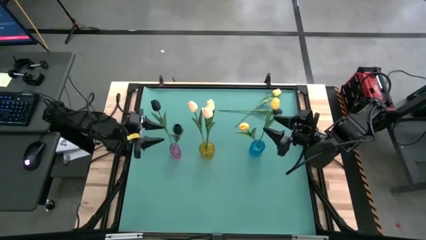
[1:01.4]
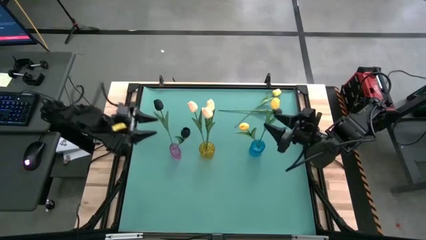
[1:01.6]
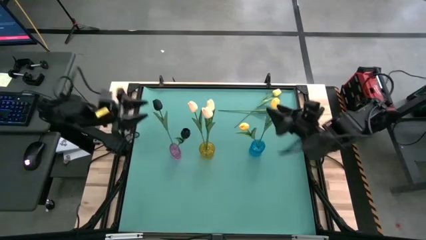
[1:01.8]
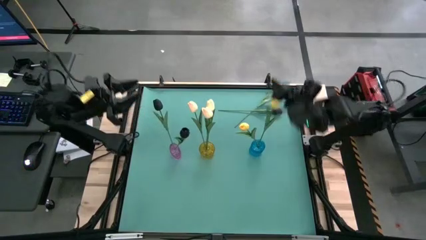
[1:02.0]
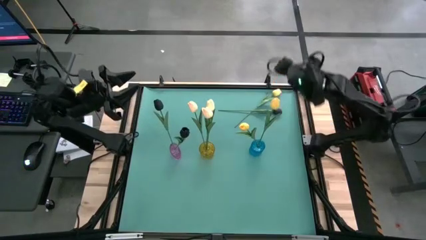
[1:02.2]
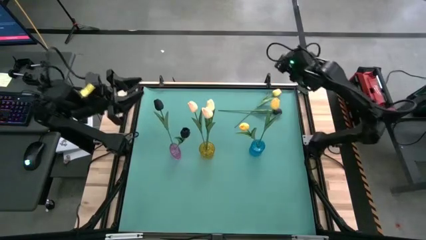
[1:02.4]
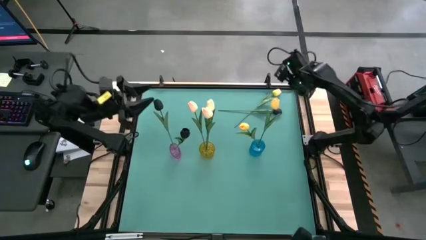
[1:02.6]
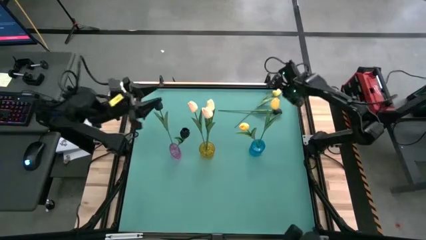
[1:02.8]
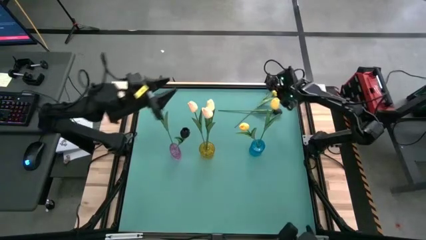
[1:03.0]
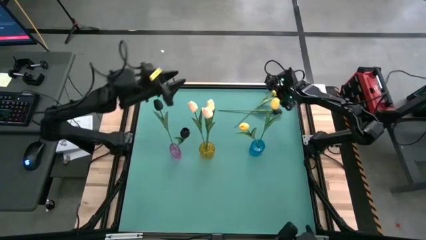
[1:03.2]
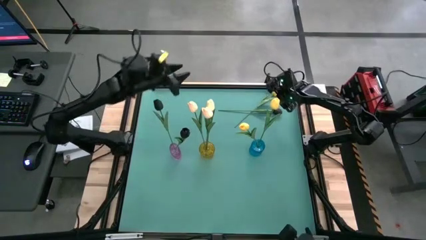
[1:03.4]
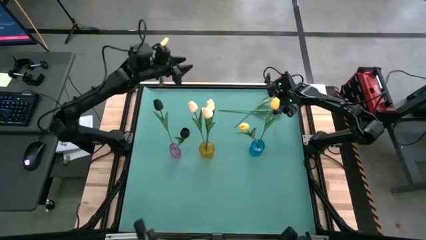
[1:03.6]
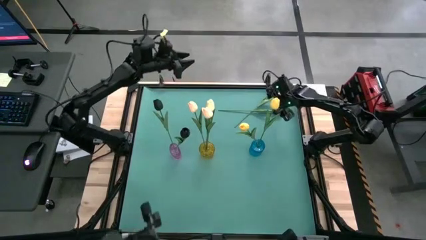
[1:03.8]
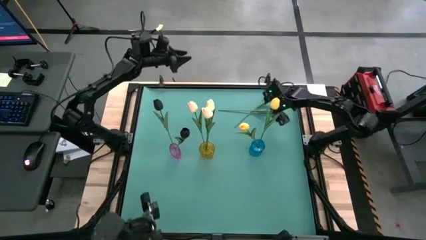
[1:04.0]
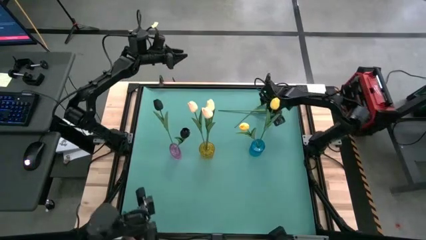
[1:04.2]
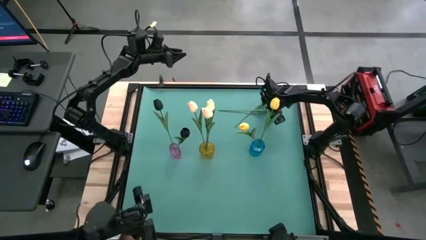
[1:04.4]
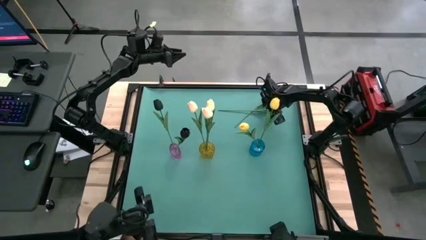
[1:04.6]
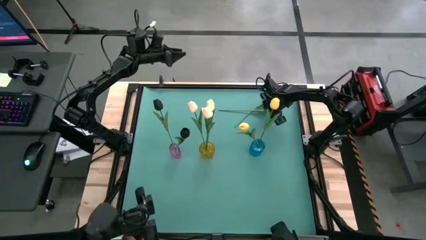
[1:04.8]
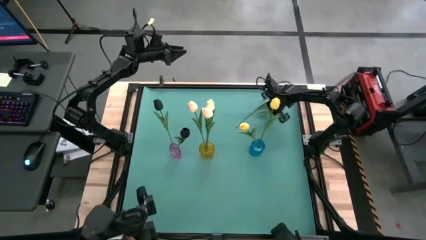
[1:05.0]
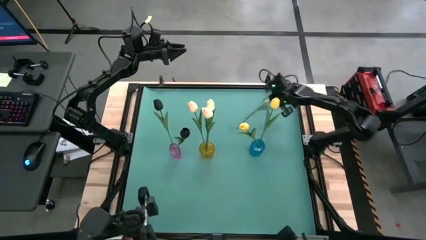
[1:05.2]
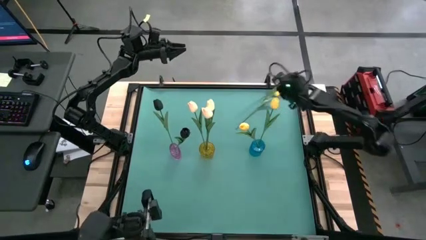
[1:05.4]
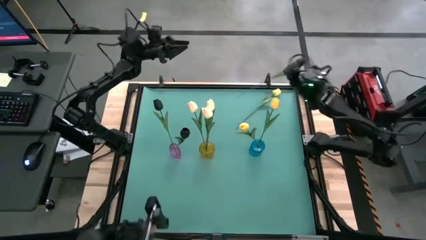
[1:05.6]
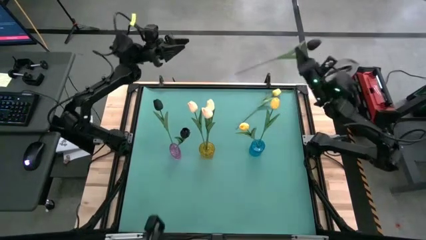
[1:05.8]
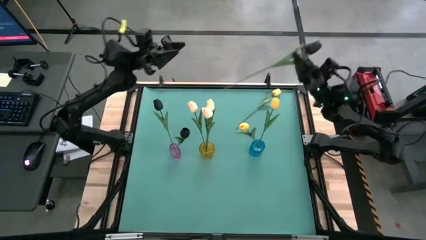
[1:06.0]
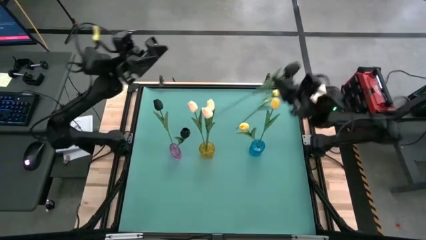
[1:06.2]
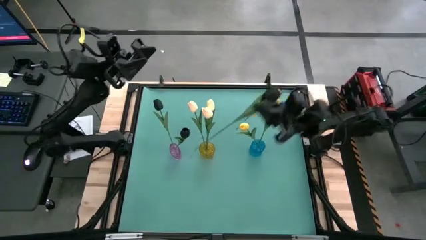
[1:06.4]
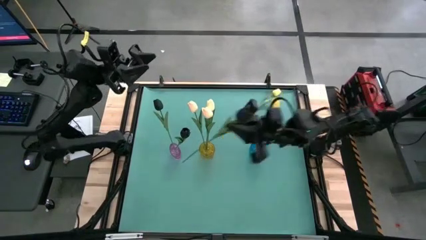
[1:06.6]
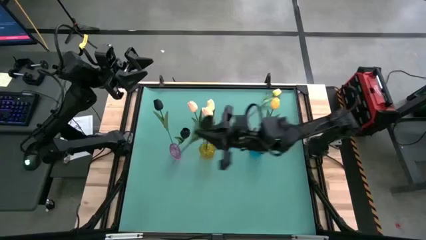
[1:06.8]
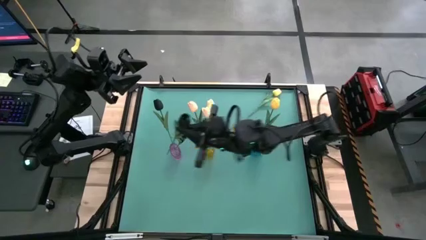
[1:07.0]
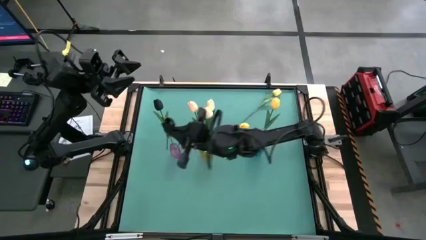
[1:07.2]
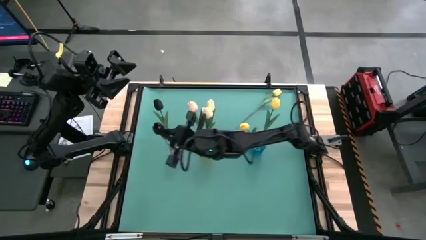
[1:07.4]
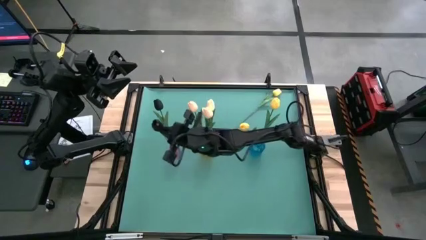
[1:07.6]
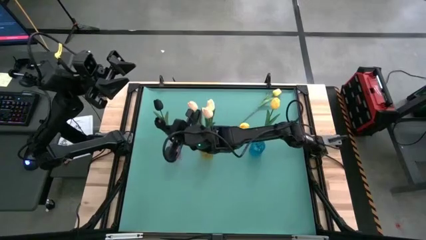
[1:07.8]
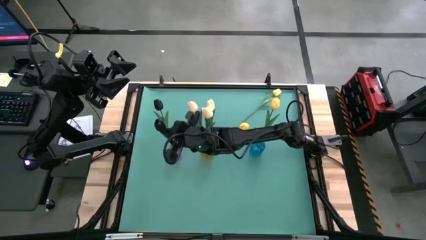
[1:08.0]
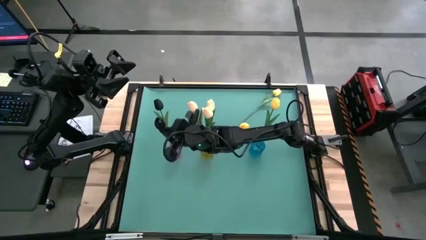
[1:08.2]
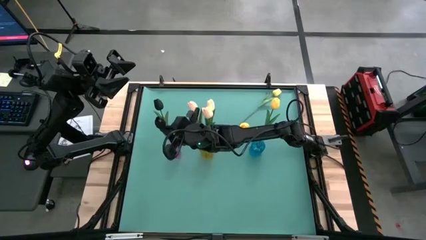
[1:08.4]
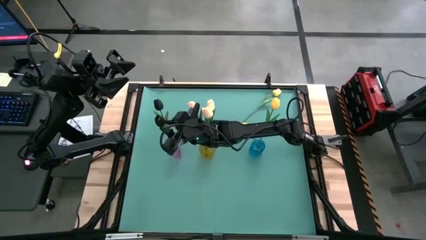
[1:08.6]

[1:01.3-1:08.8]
Task: Sort flowers into vase by color
Put the black flower into the purple vase

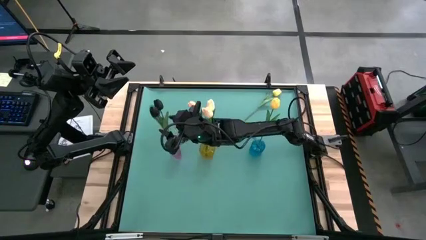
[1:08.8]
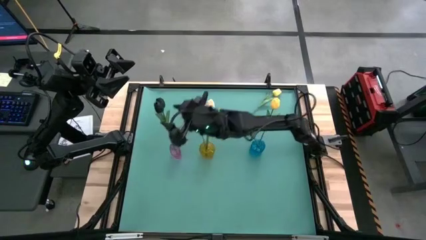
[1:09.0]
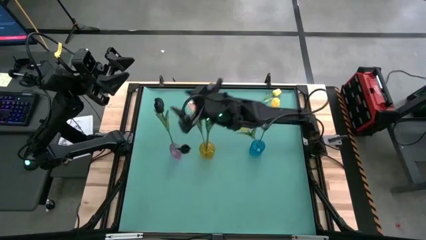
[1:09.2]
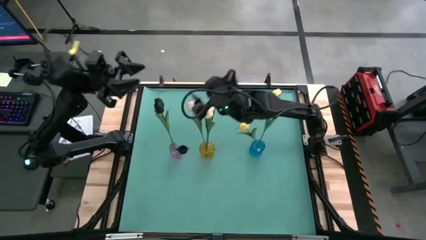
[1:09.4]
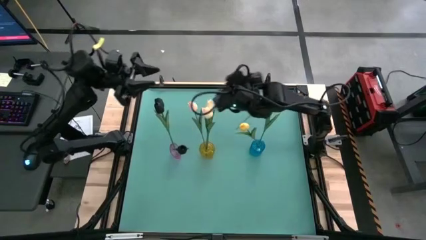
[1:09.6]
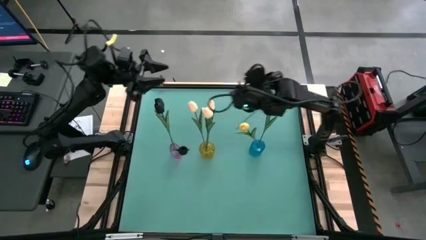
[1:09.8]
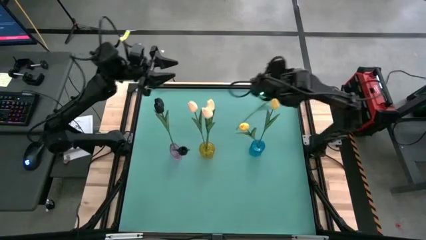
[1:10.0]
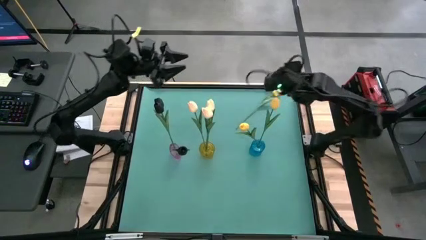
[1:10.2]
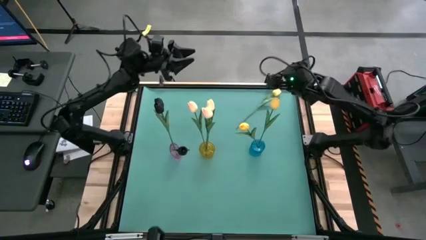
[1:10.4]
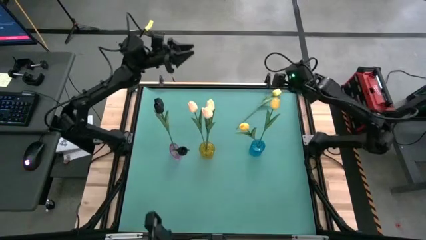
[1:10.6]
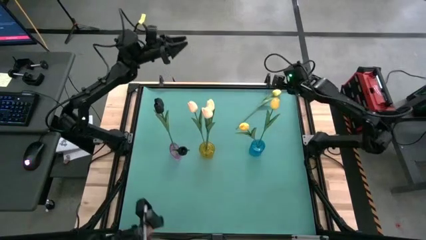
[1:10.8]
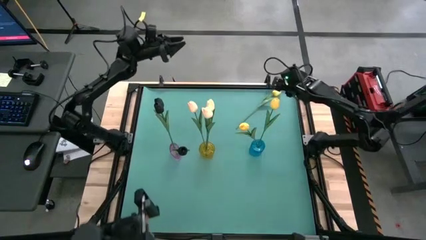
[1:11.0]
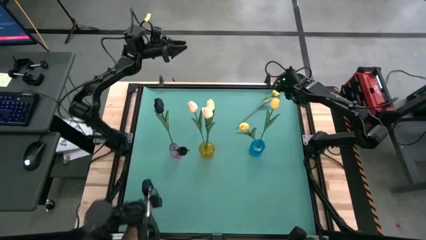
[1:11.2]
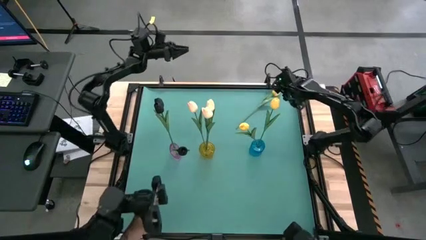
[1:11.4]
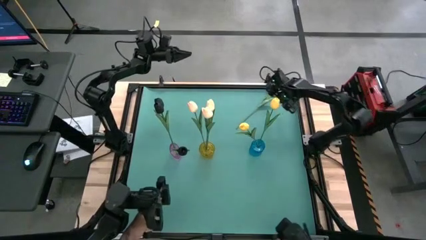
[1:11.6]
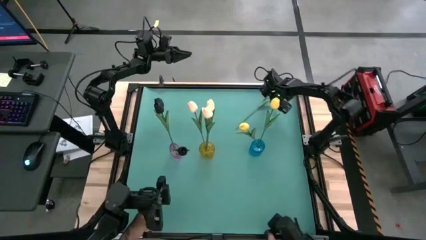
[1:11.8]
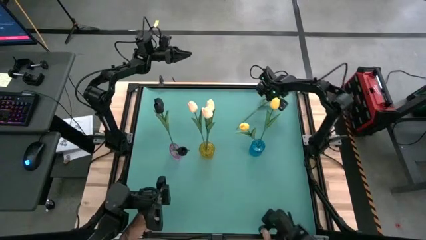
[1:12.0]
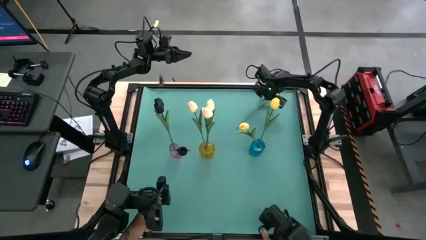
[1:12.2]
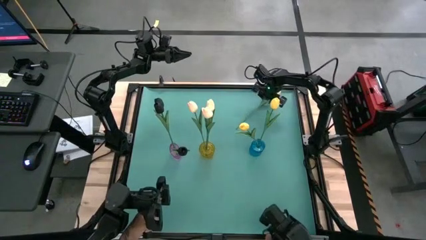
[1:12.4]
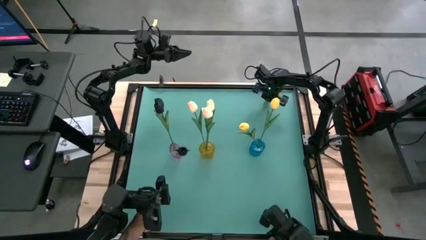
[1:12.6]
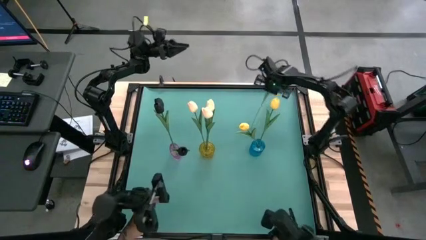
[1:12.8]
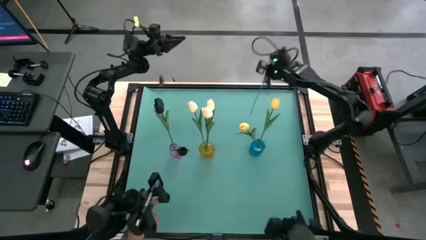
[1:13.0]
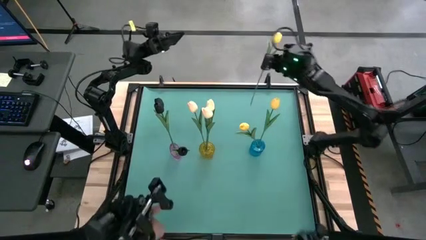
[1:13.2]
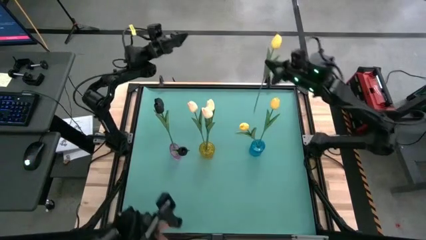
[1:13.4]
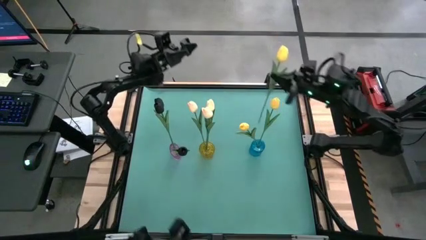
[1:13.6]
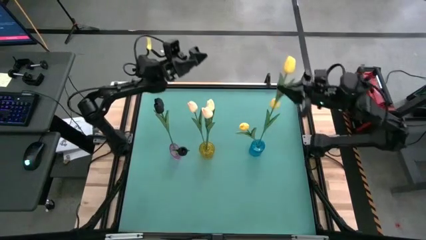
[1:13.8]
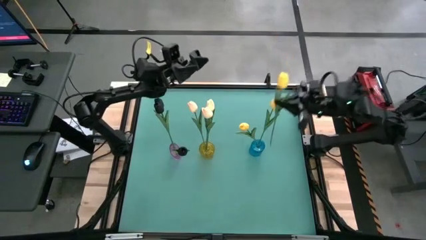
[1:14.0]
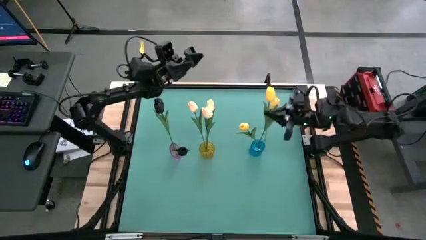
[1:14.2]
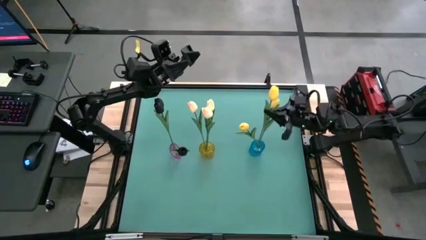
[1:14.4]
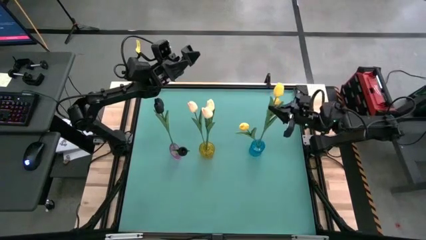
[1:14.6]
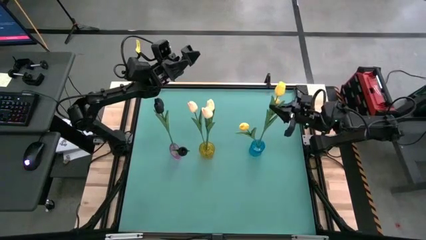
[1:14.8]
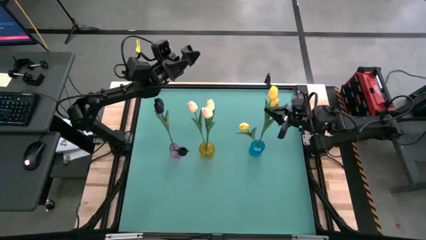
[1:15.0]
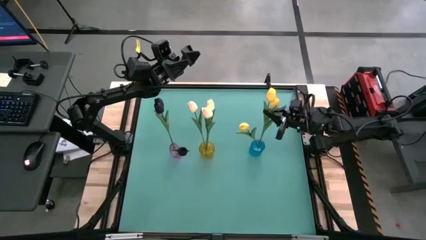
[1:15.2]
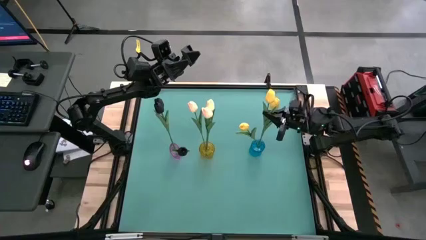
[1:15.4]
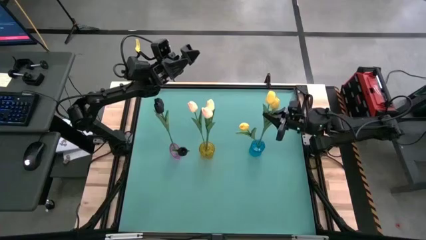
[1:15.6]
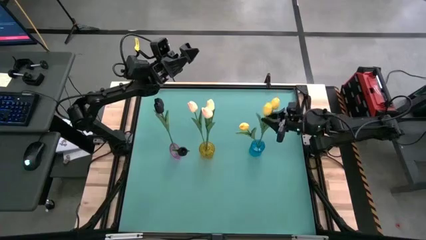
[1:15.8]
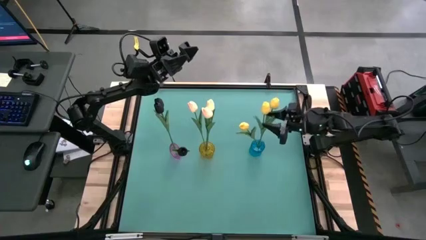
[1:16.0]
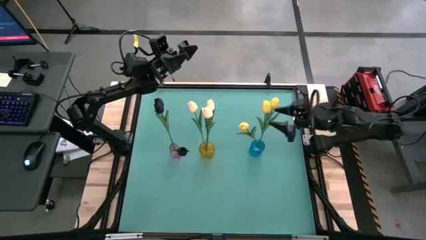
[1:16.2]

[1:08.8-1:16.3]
Put the yellow flower into the blue vase

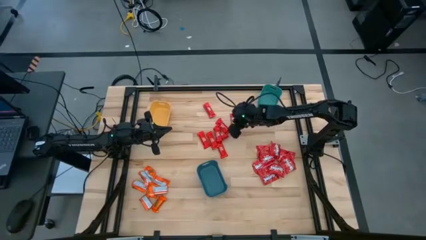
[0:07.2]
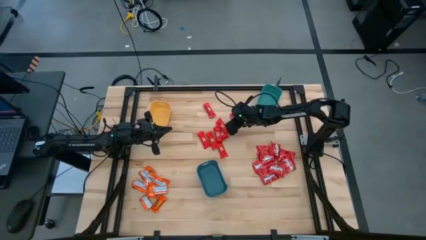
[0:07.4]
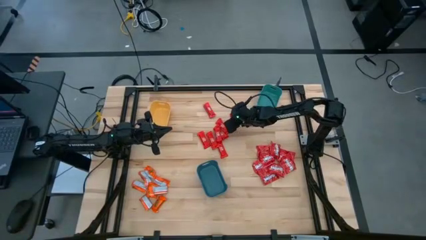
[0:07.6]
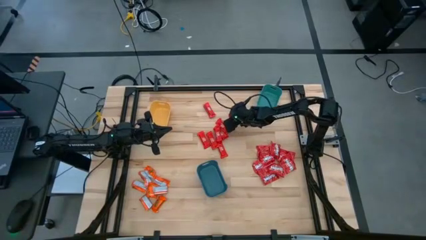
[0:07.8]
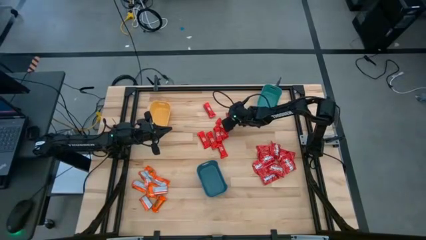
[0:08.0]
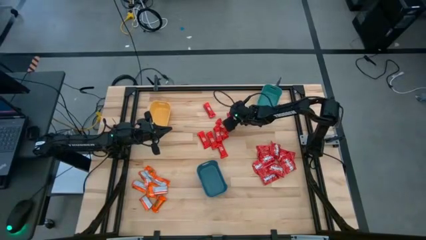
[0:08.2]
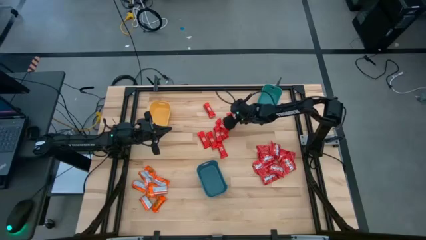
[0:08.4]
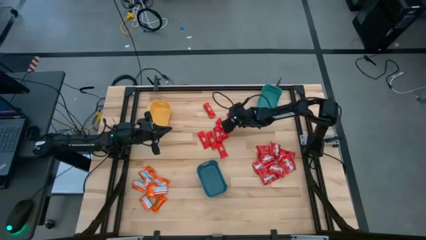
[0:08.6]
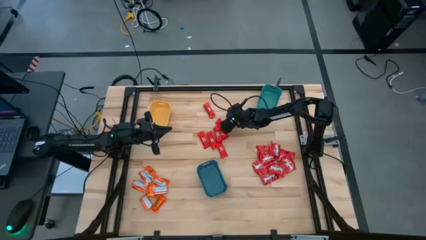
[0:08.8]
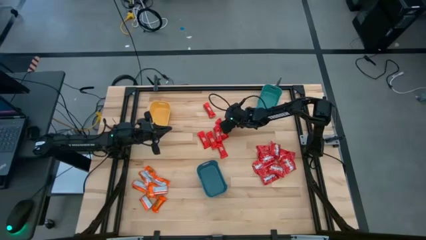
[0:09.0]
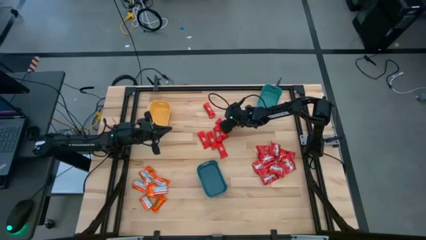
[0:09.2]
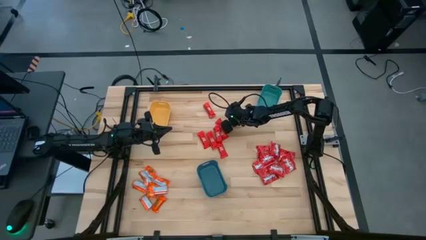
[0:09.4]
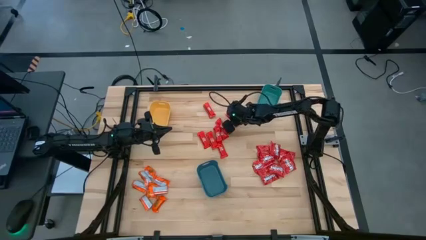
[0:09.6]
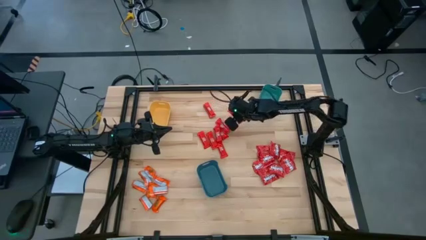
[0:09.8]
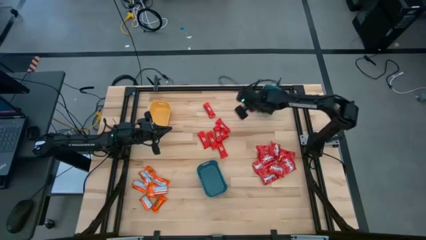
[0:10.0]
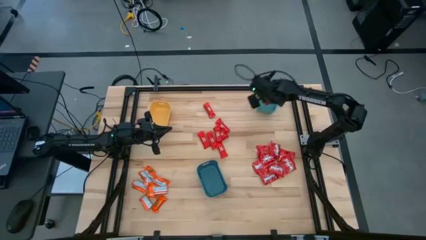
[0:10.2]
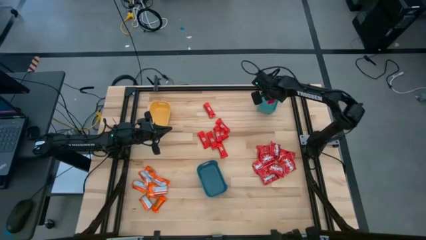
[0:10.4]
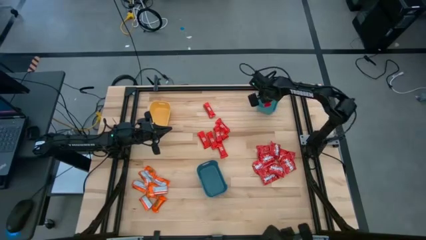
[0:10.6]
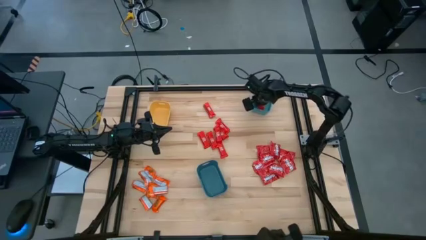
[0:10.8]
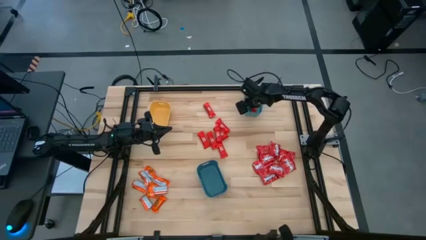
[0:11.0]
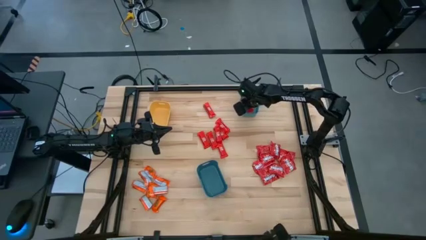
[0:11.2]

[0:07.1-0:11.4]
Task: Sort candy
Put the red chocolate bar into the green bin
